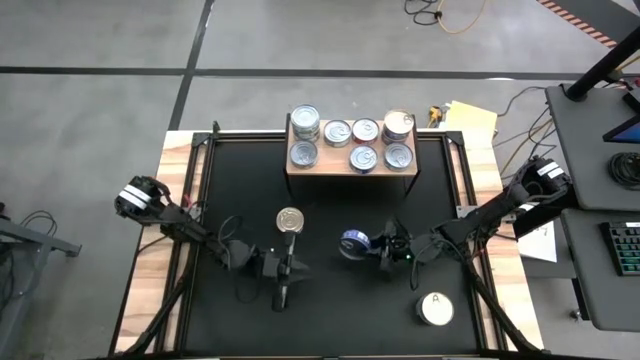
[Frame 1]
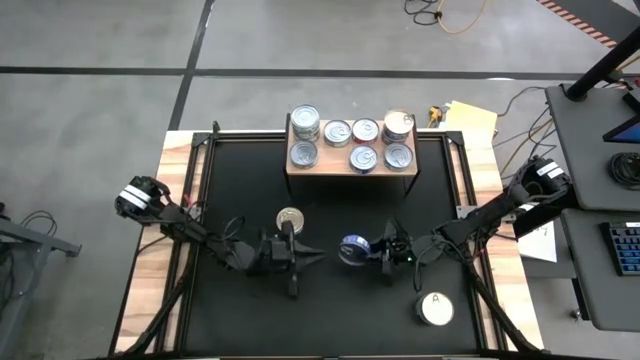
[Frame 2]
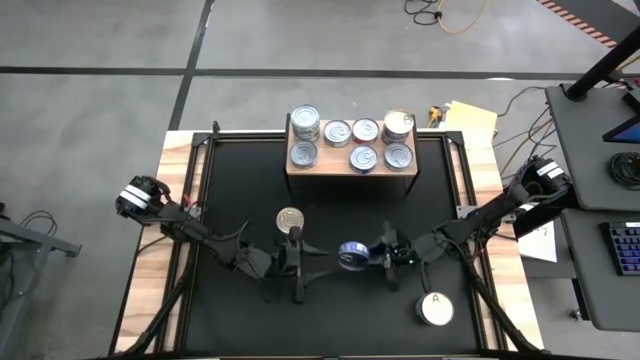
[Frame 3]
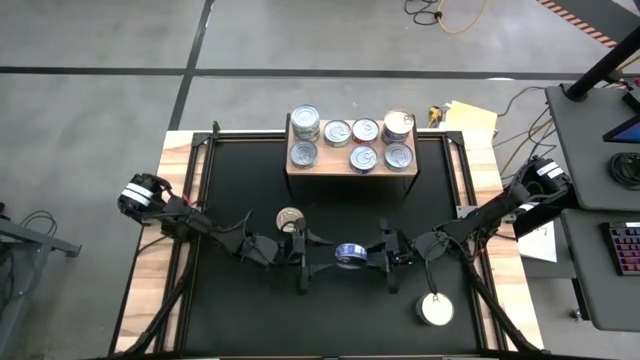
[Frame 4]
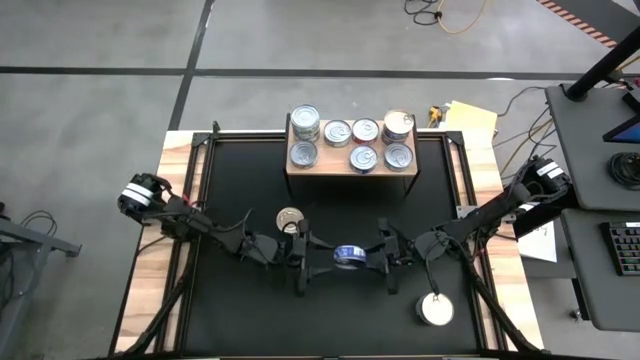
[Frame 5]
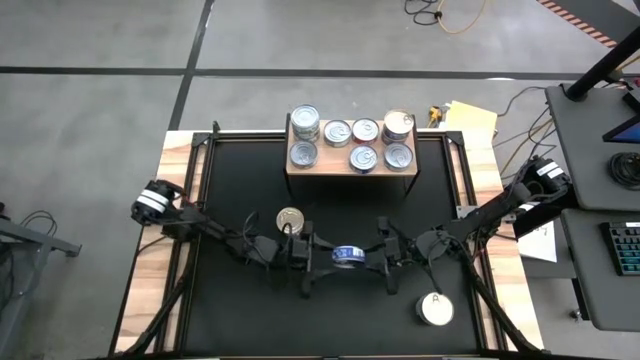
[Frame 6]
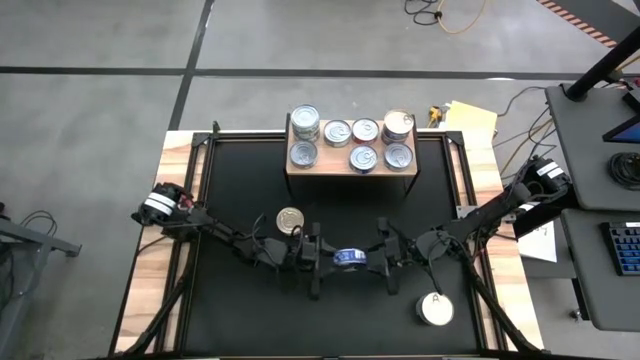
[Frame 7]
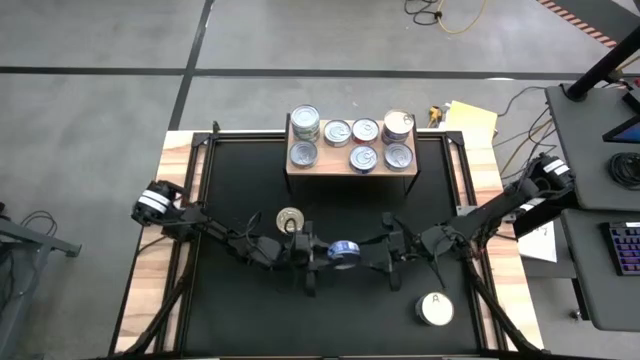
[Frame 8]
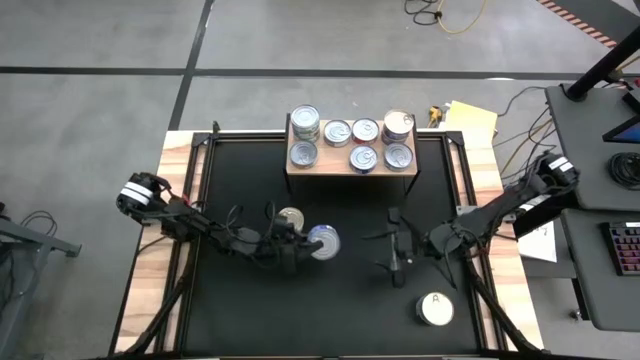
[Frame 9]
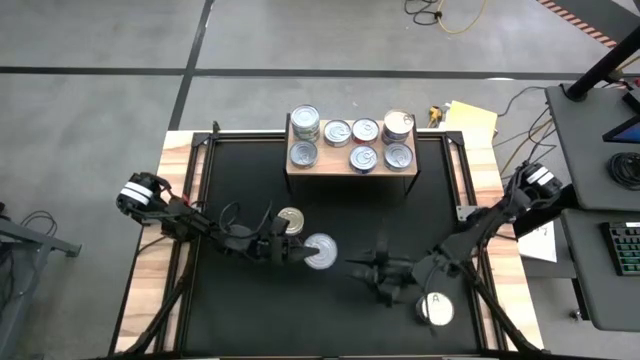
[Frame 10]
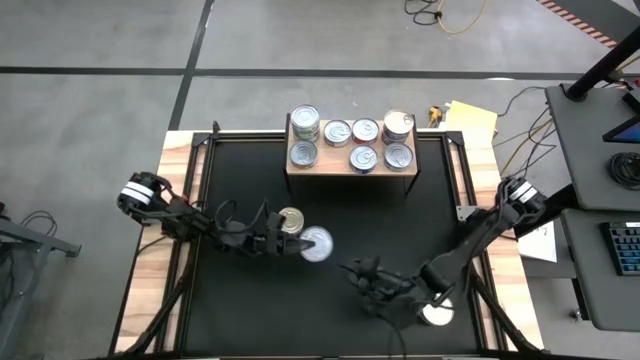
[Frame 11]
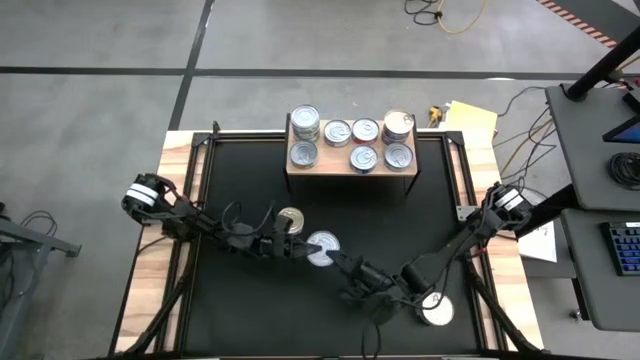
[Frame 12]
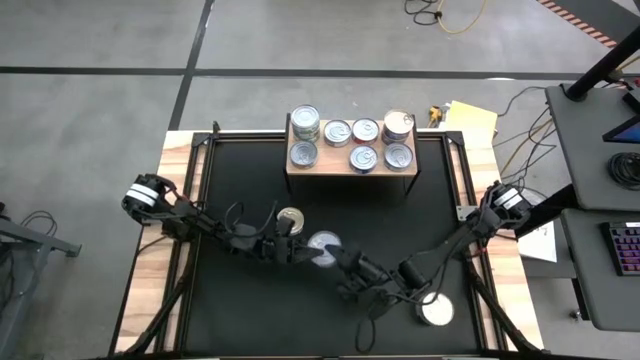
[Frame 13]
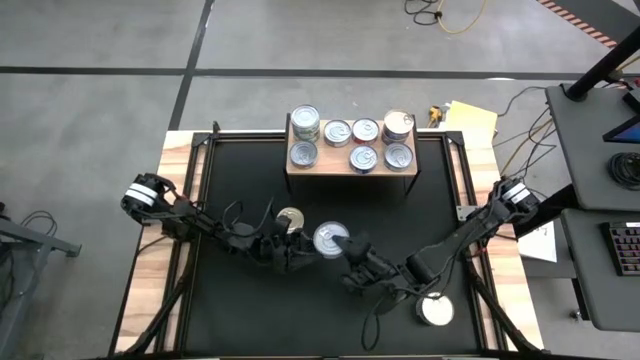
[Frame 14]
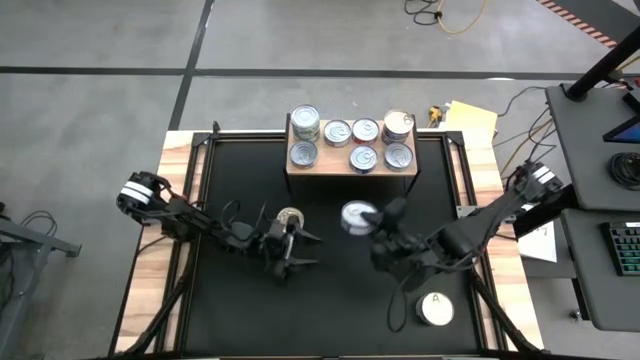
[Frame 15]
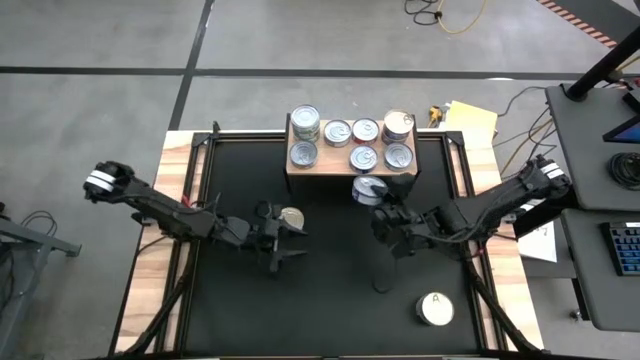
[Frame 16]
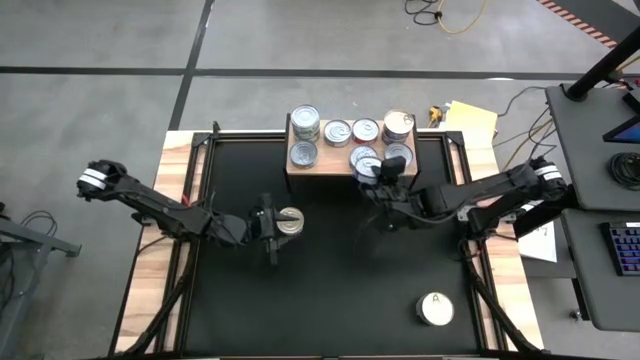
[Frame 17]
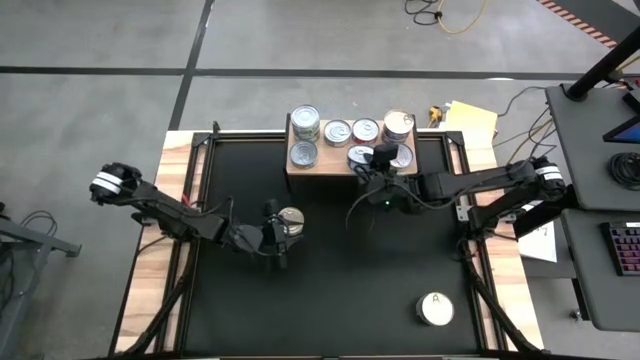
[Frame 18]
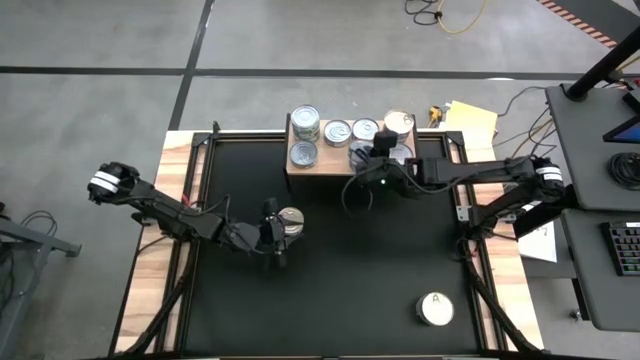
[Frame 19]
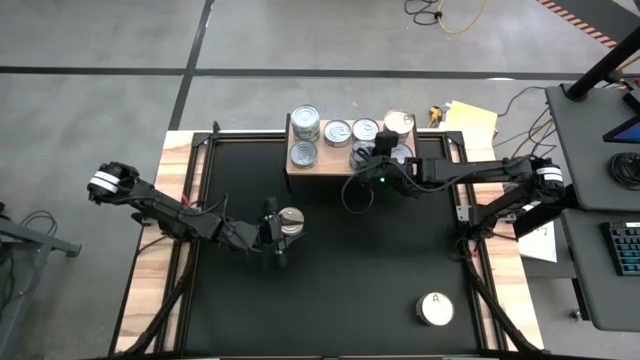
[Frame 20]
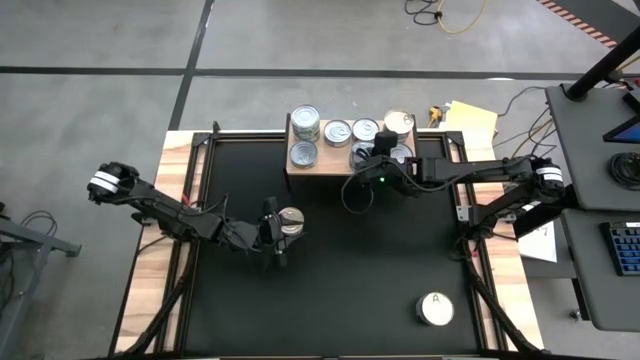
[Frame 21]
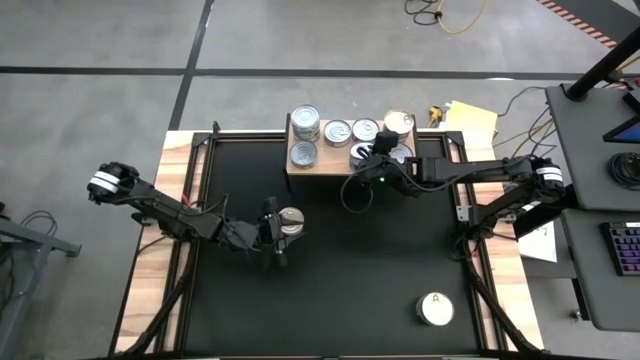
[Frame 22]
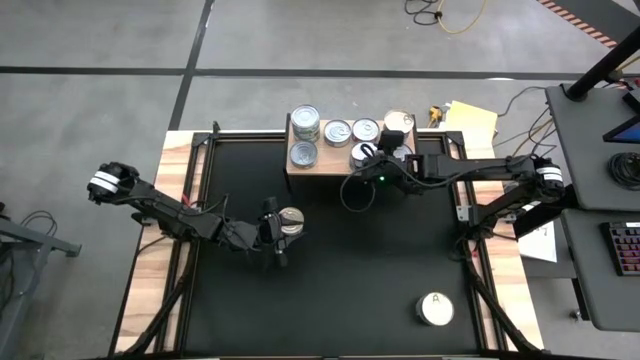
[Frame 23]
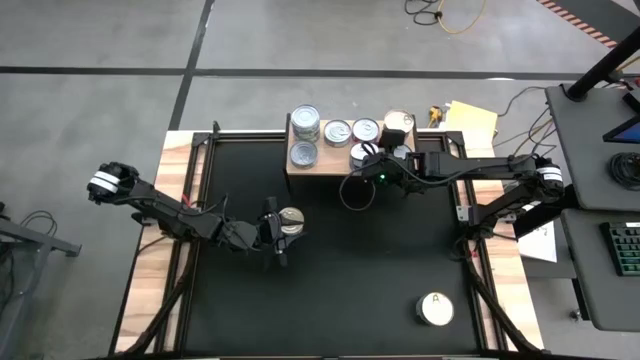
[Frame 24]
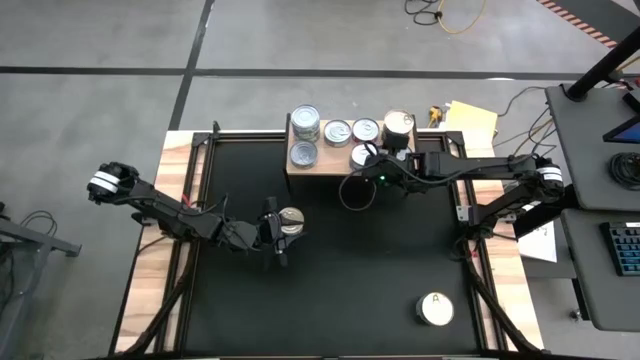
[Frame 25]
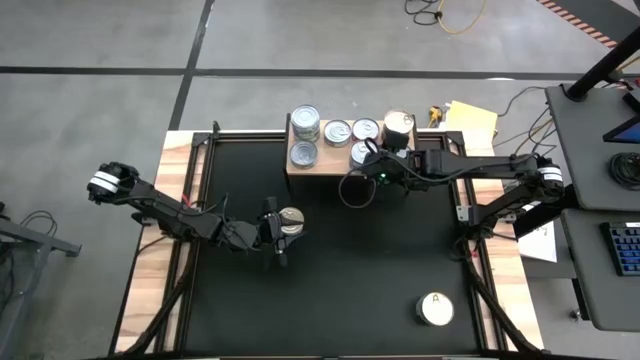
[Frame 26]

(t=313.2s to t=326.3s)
Task: Stack canned seafood by type on shelf
Stack the blue tuna can on top of the blue tuna can on the shelf

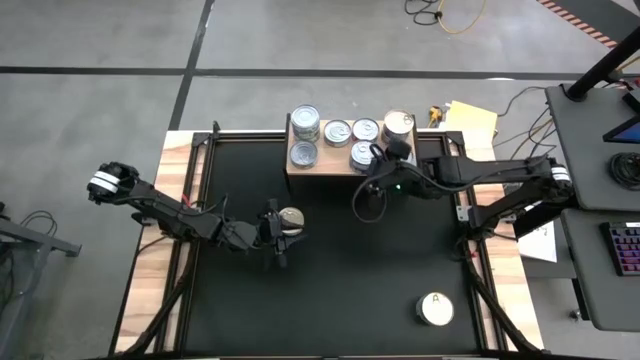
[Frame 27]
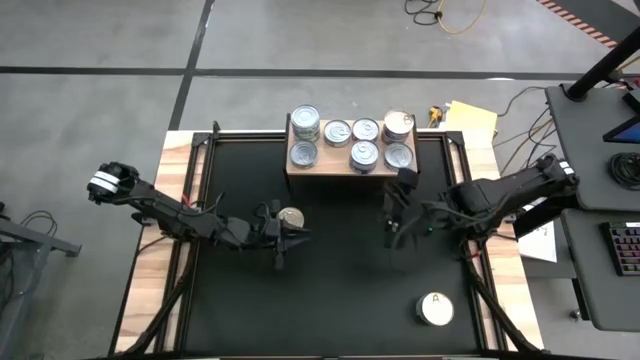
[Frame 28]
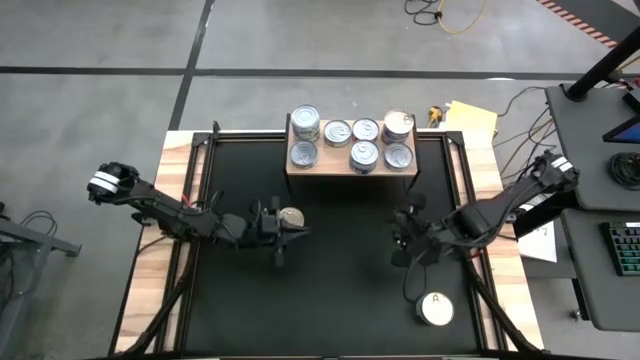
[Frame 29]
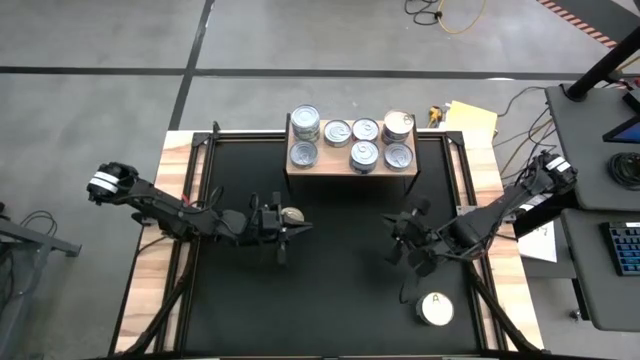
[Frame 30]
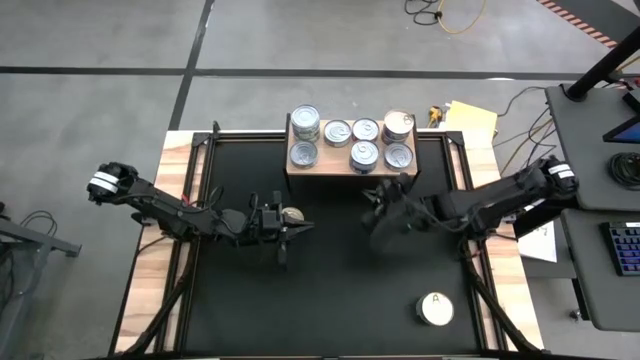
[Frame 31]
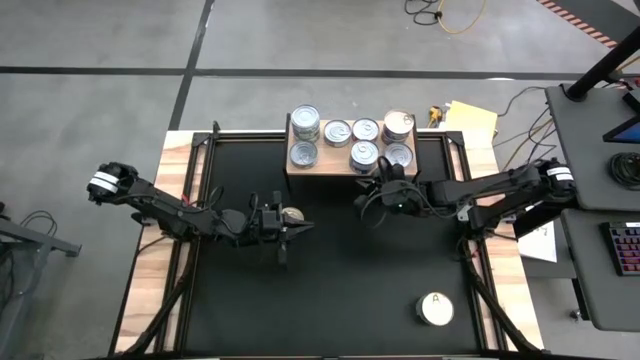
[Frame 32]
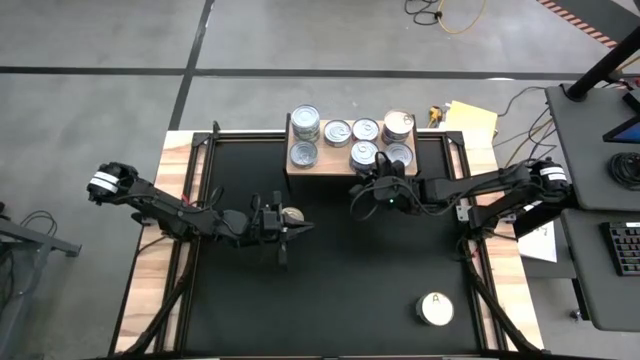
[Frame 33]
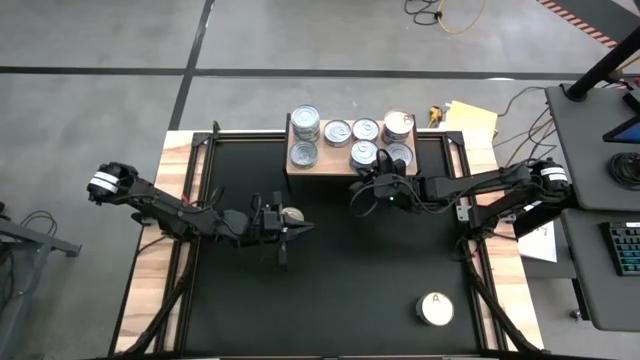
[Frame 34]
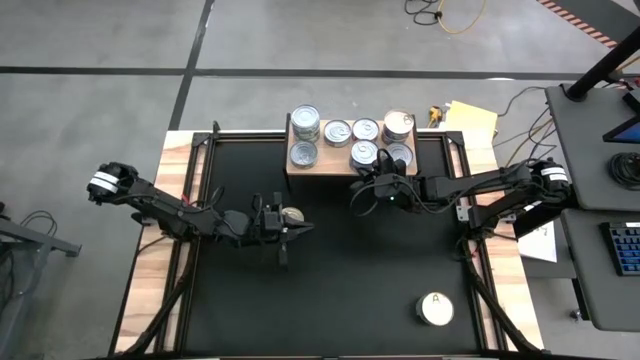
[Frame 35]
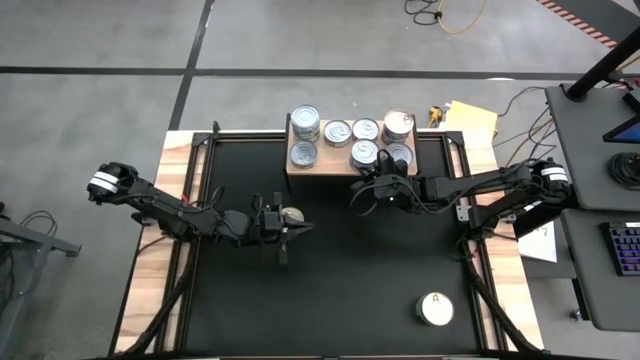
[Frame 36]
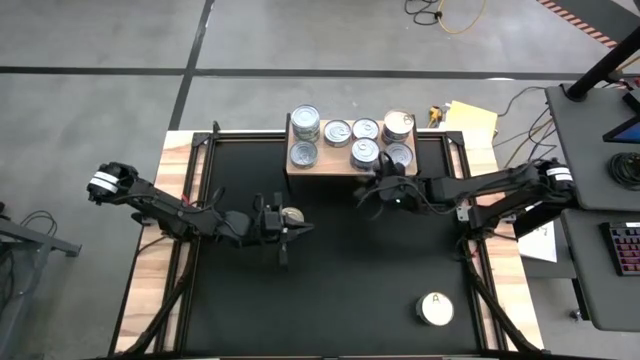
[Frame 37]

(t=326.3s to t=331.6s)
Adjust the blue tuna cans

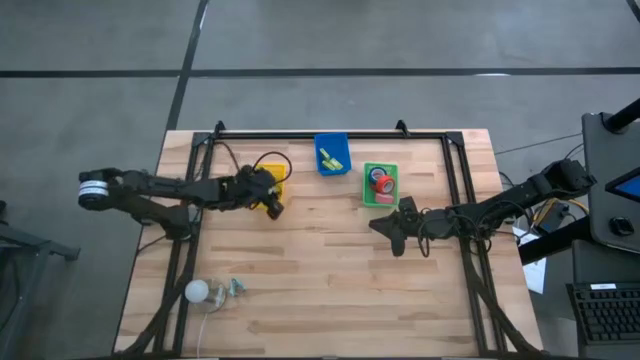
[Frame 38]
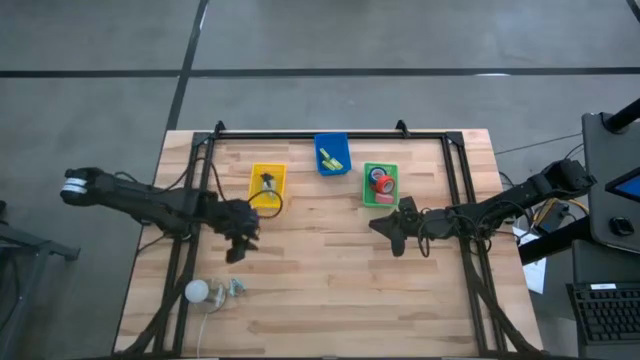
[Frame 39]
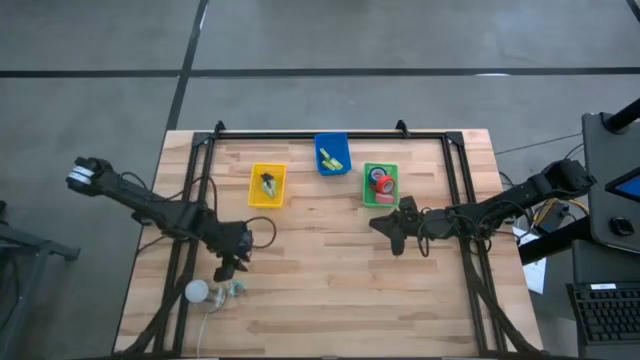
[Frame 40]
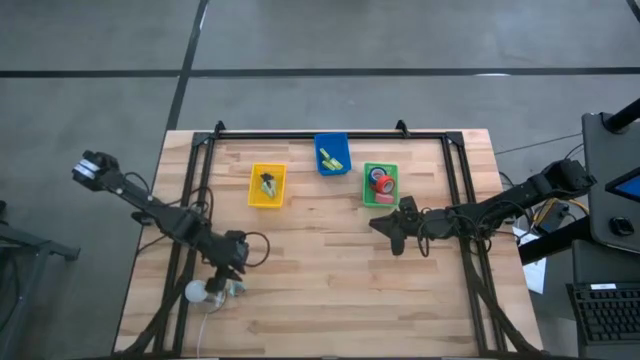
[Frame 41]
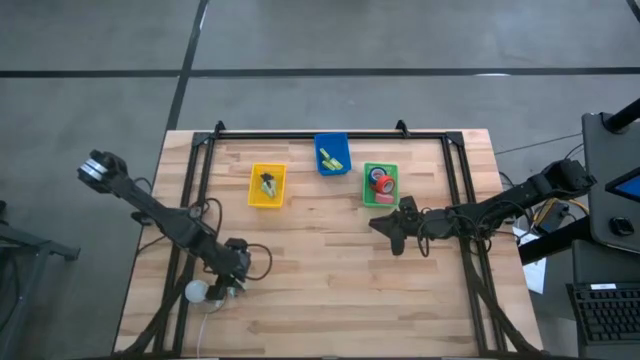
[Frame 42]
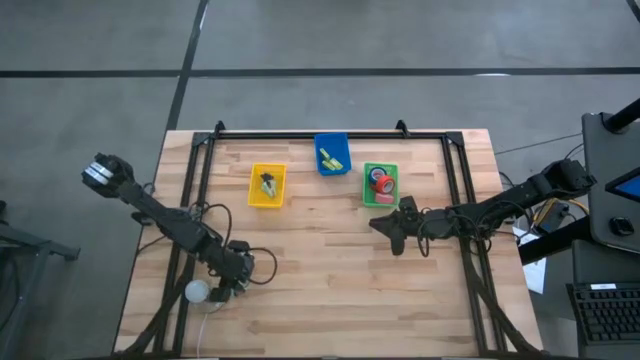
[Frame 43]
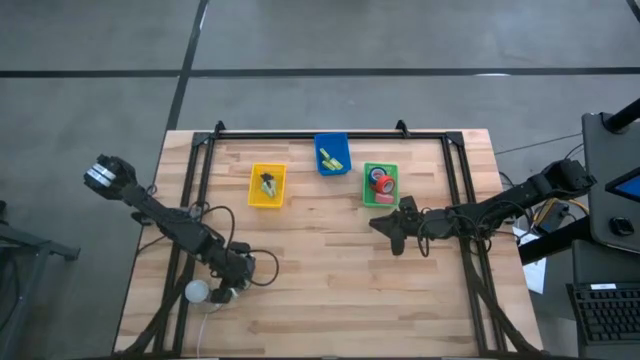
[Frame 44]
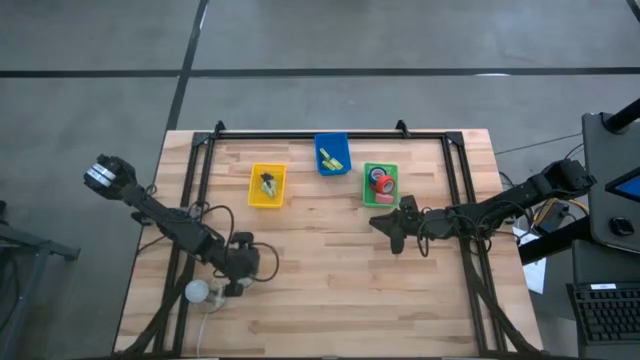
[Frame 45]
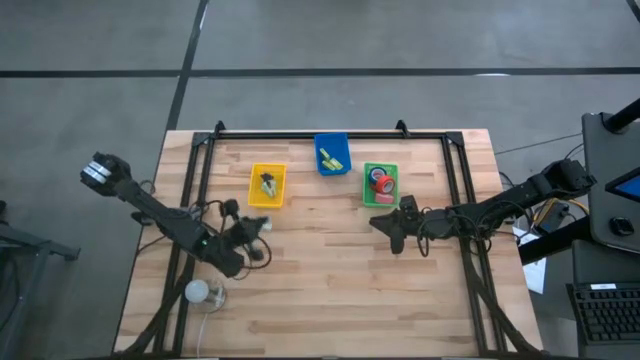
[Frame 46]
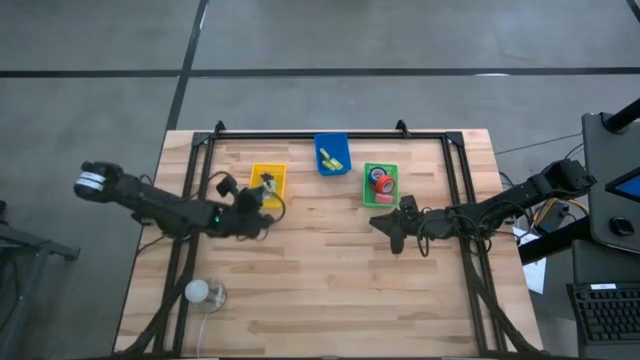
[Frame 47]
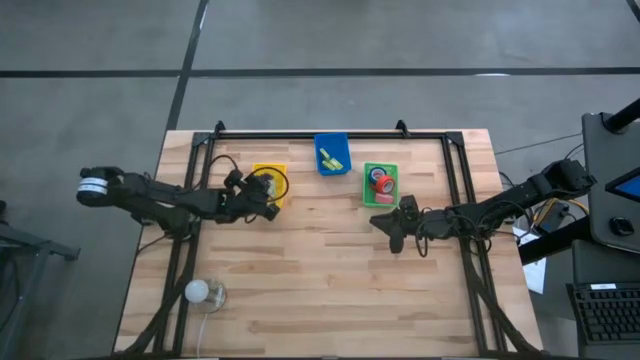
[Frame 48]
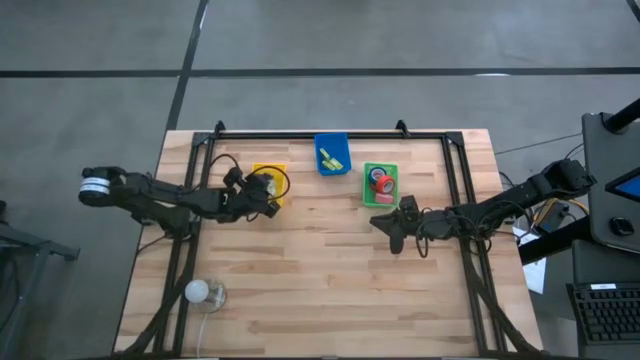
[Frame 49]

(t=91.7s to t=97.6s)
Task: Pick and place Stapler, Stapler remover, tape
Put the light blue staple remover into the yellow basket
